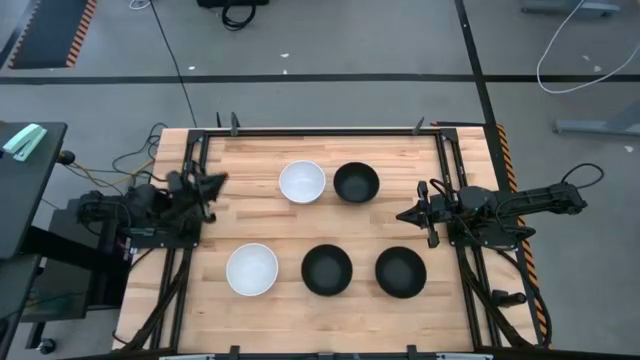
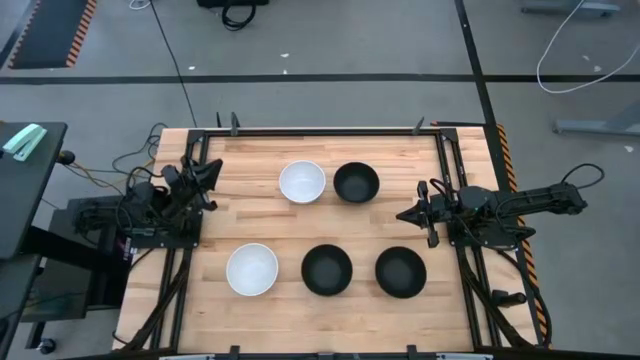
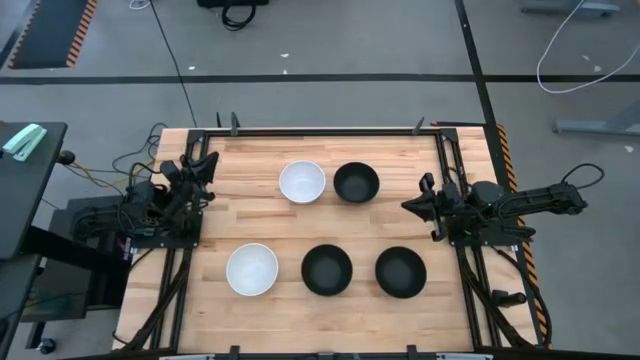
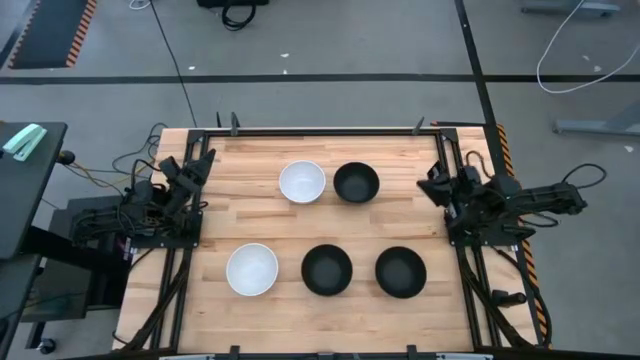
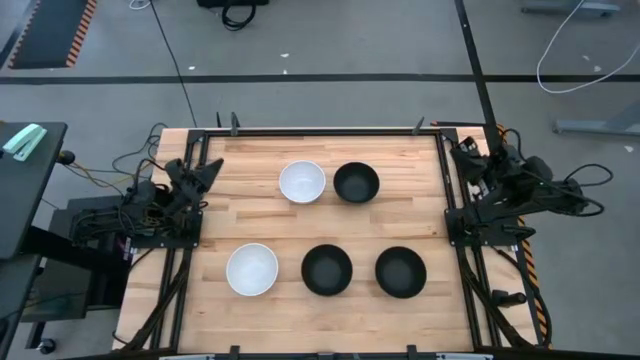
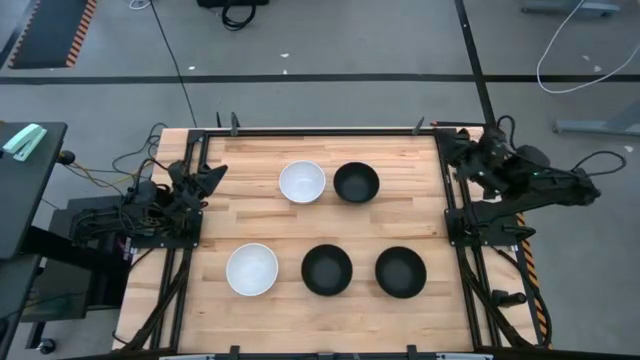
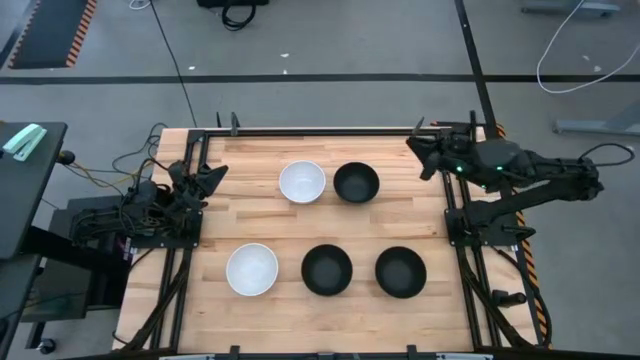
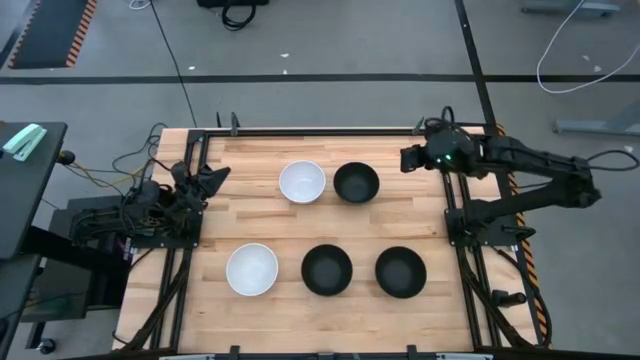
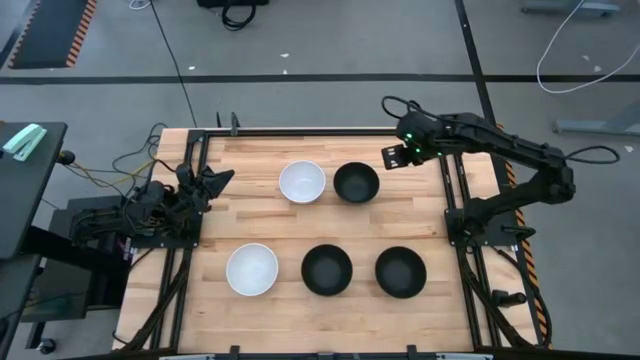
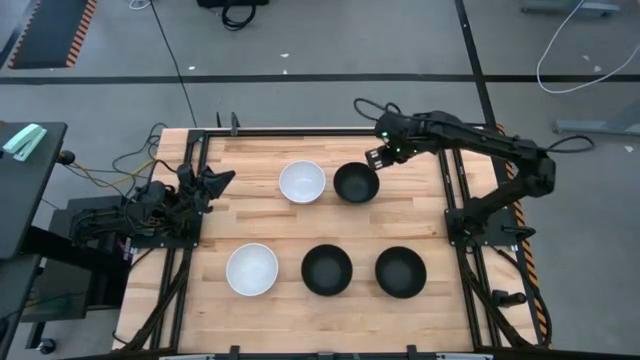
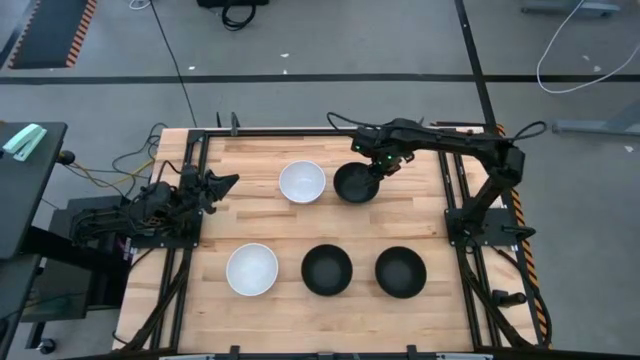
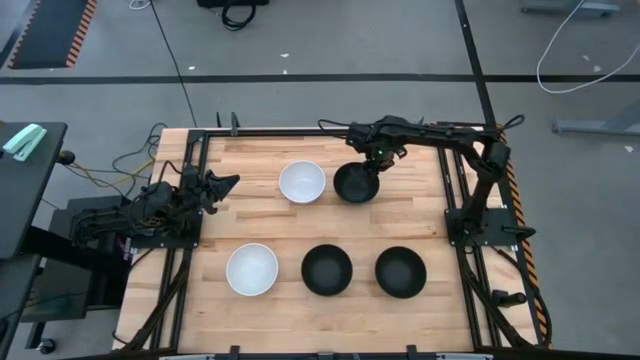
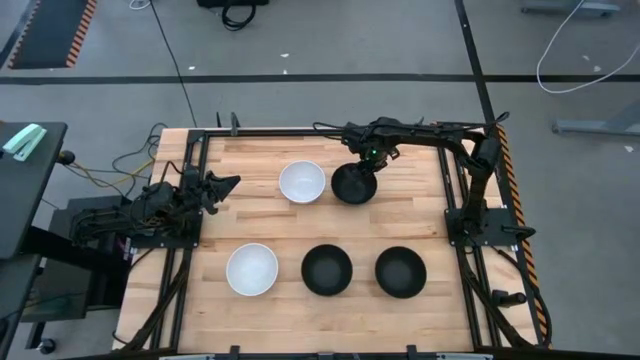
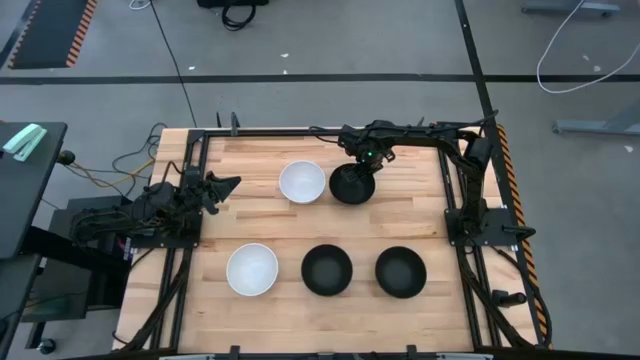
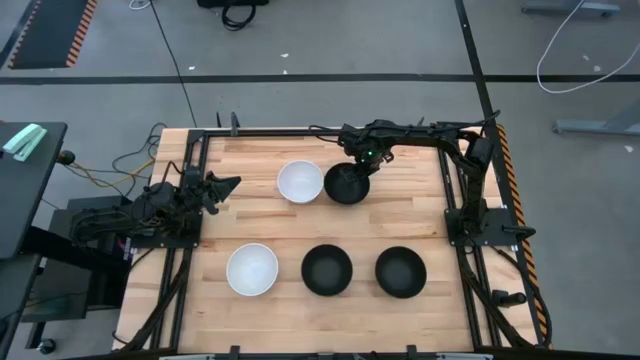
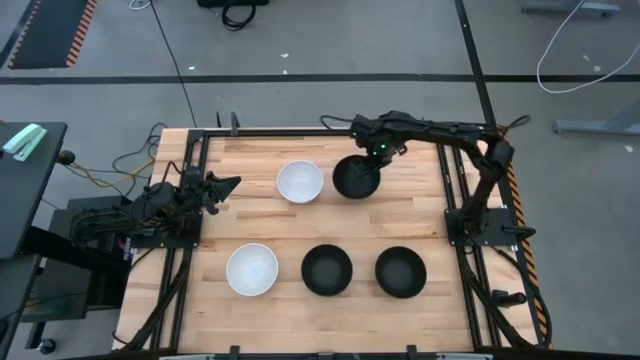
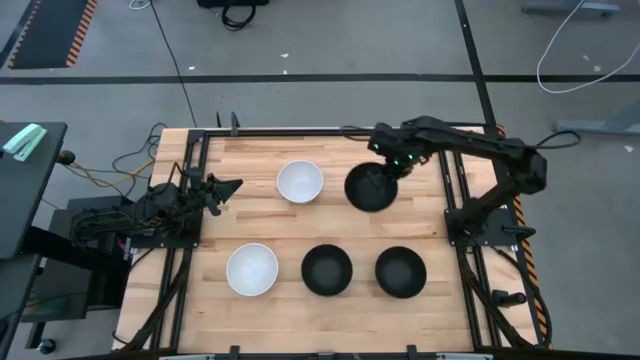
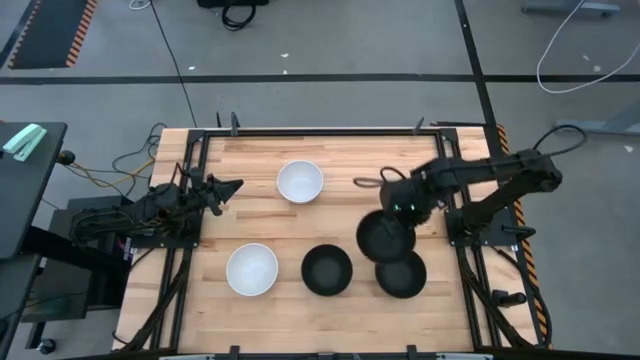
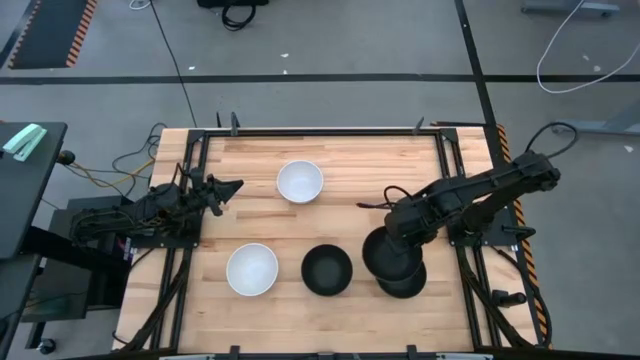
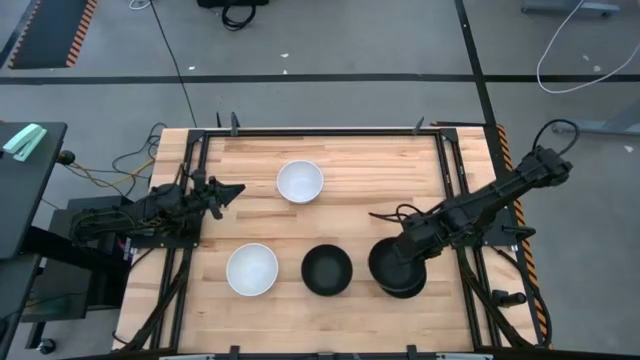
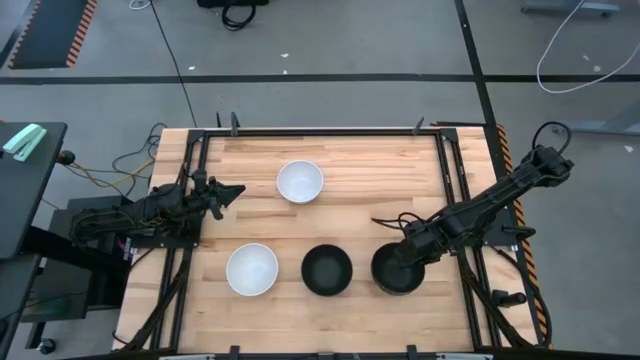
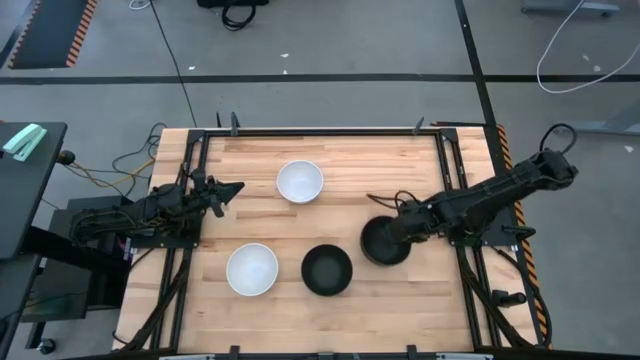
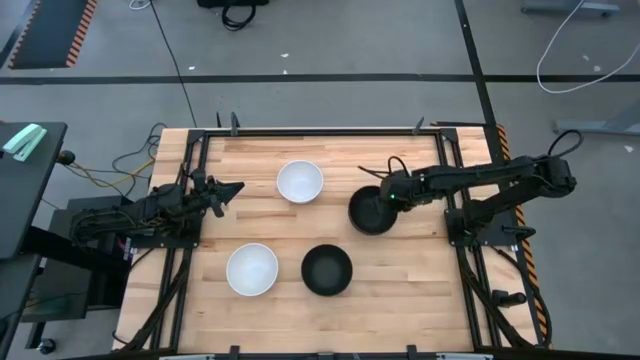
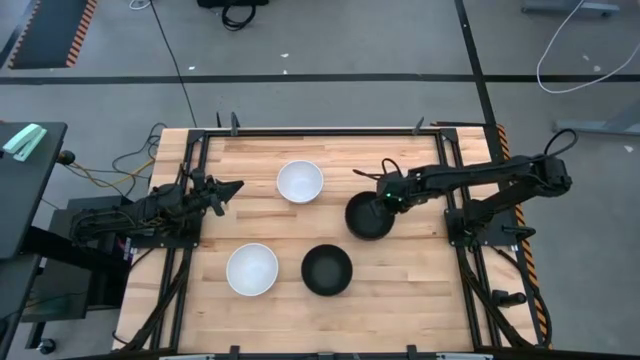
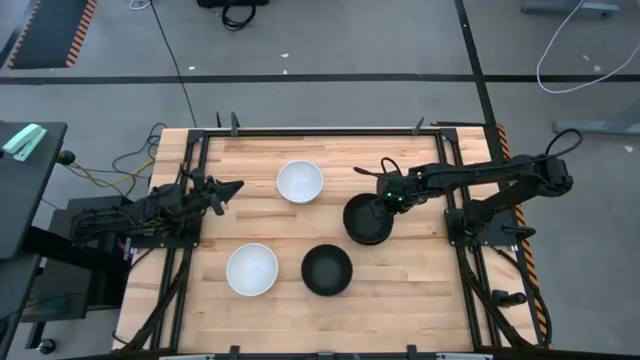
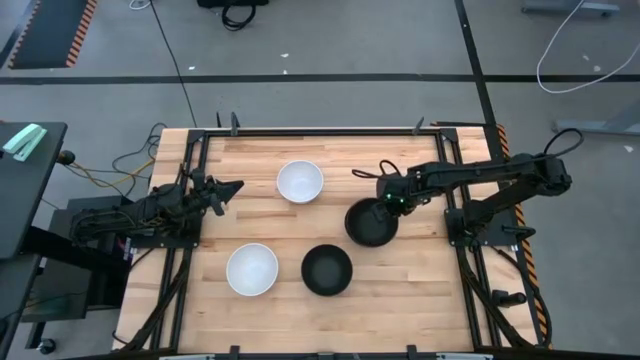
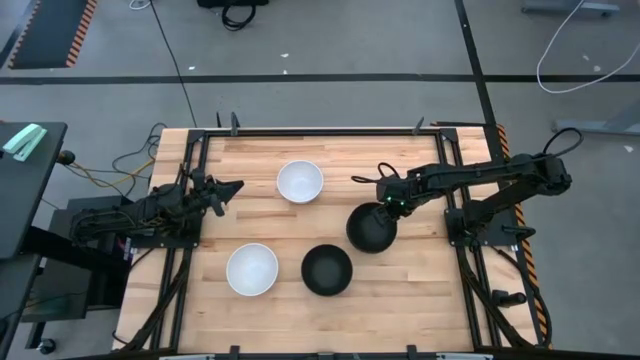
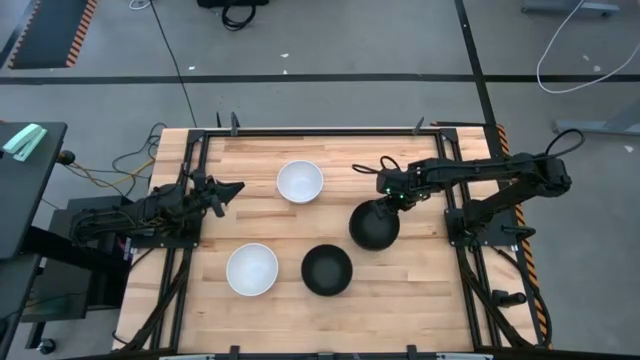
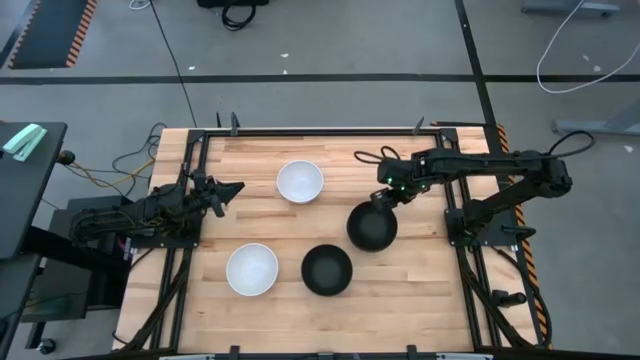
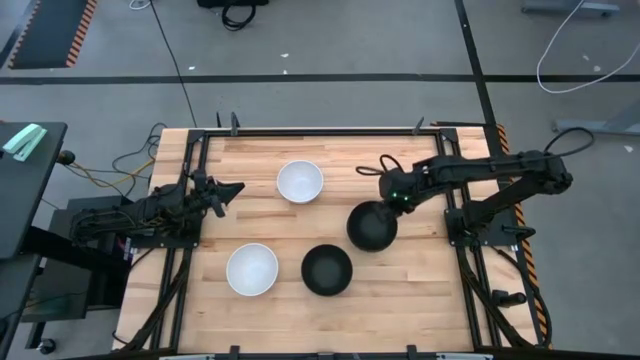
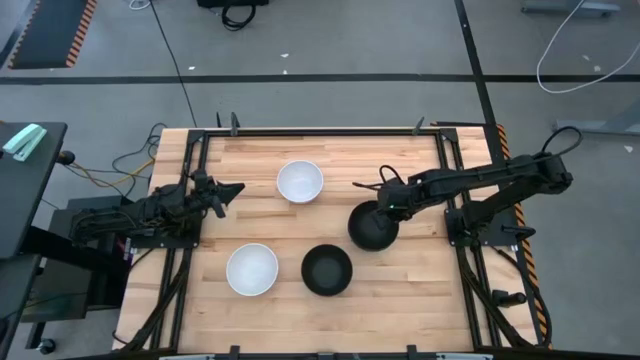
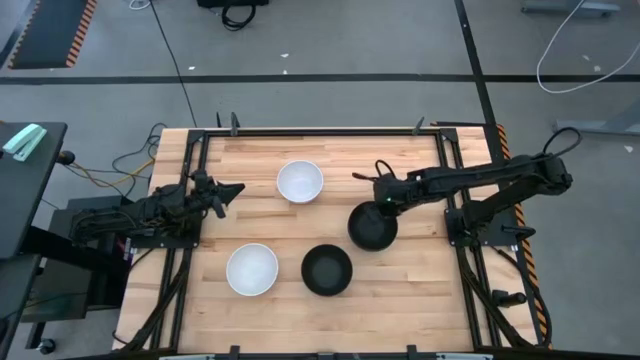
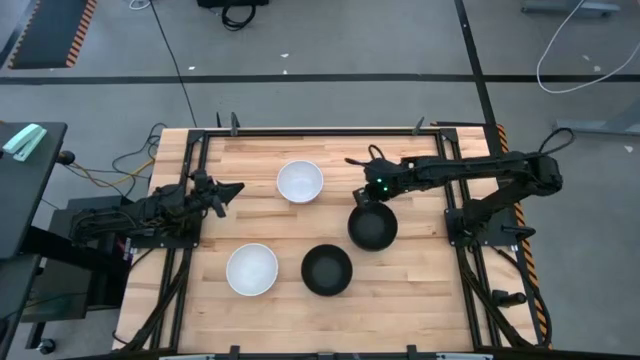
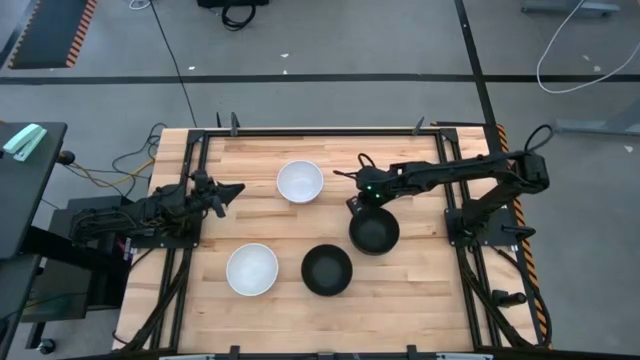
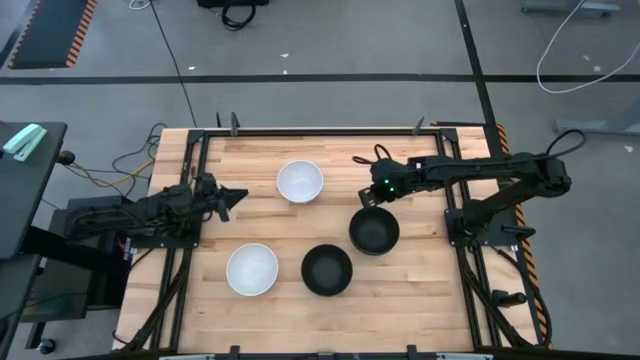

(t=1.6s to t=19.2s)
Task: Nest bowls inside each other
Stack the top black bowl on top of the right black bowl

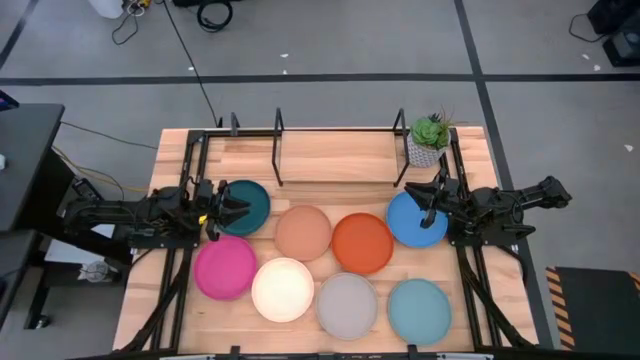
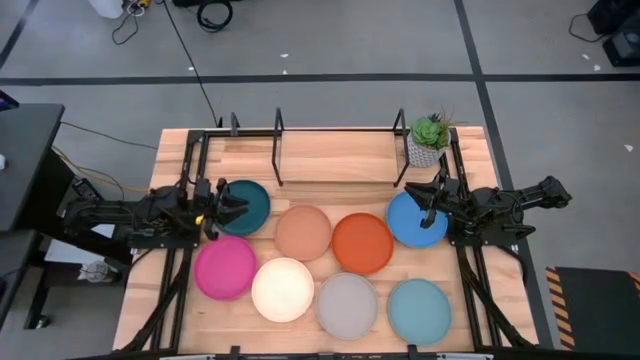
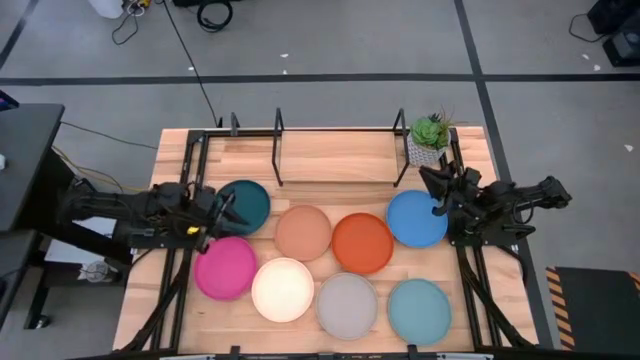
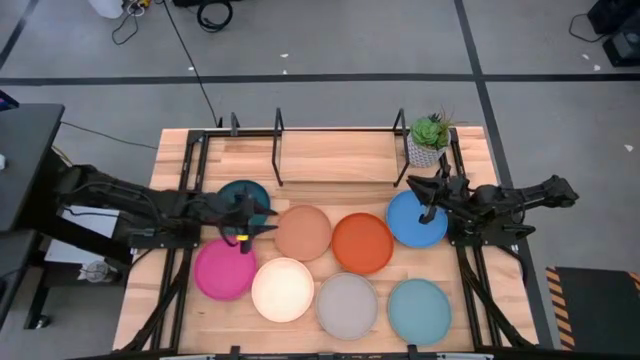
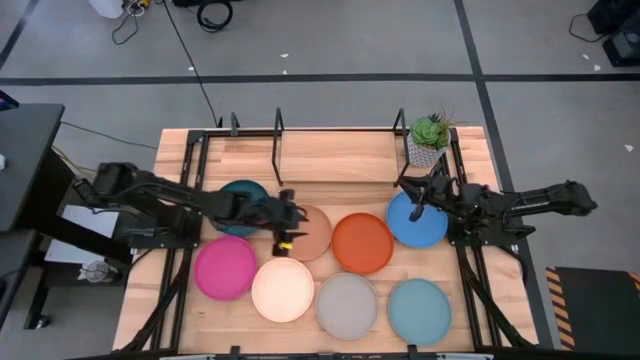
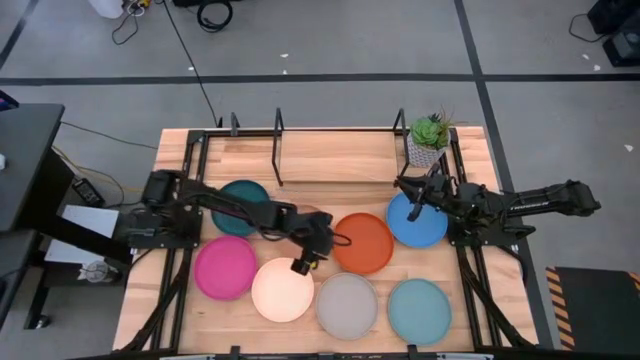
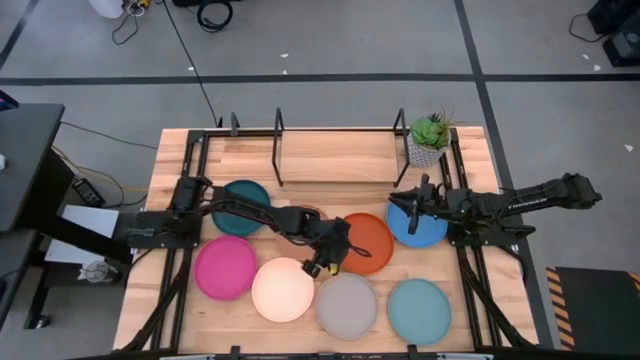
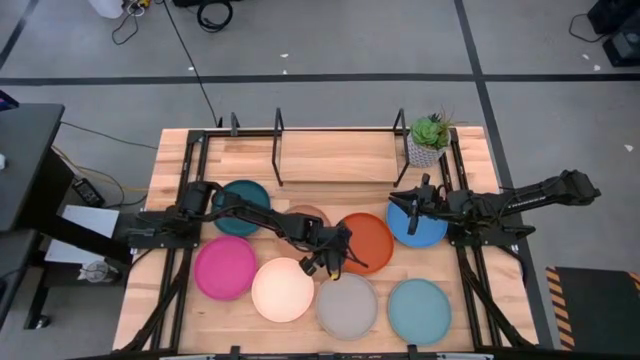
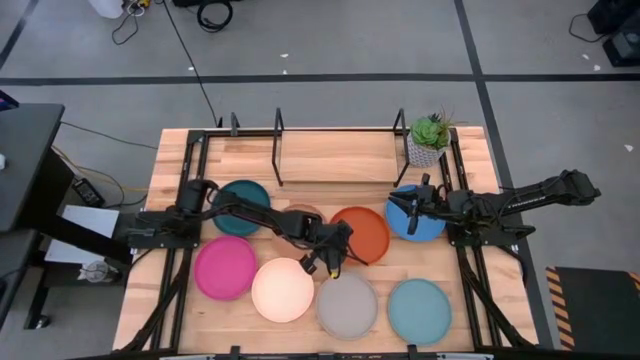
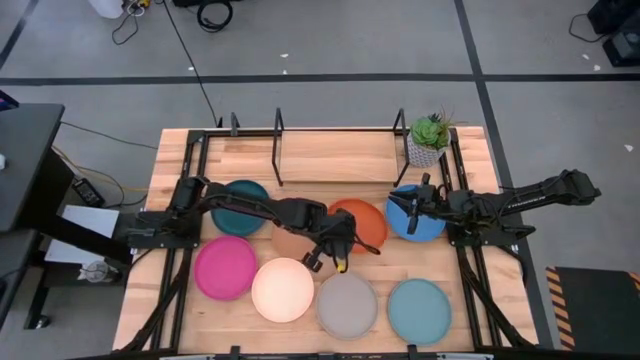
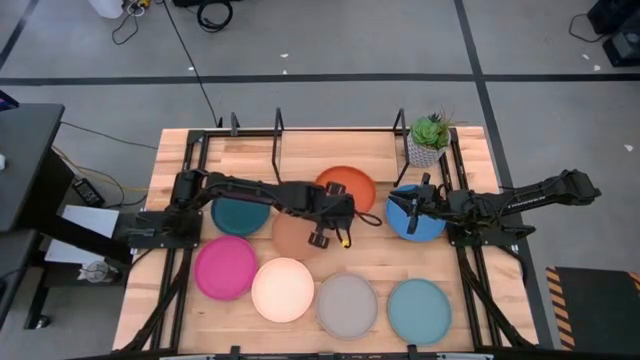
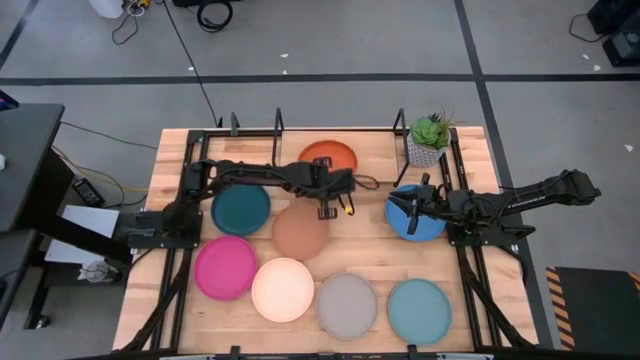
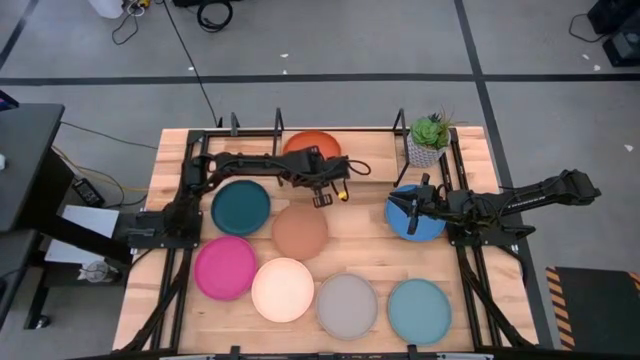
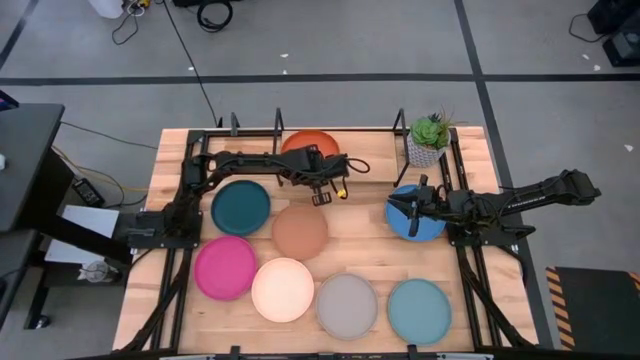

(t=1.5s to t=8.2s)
Task: Place and stack plates onto a shelf
Put the orange plate on the shelf
